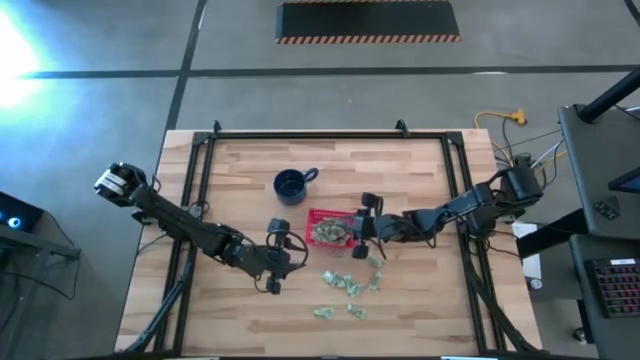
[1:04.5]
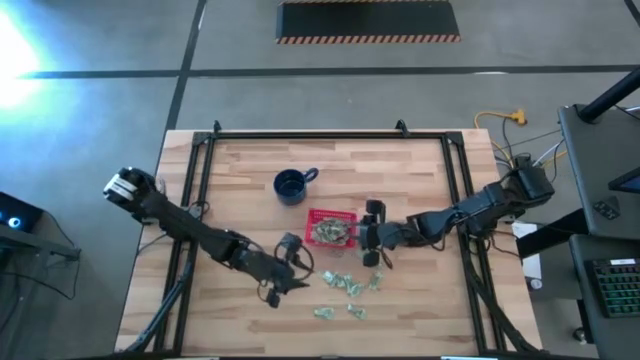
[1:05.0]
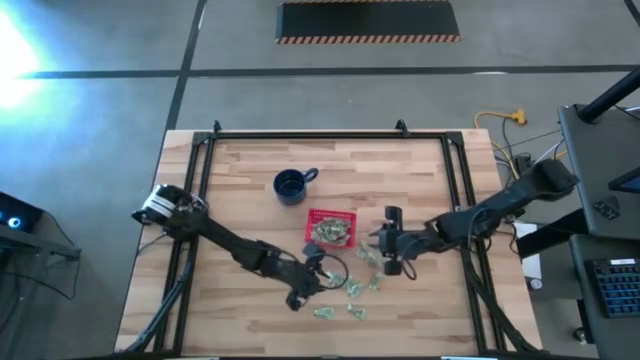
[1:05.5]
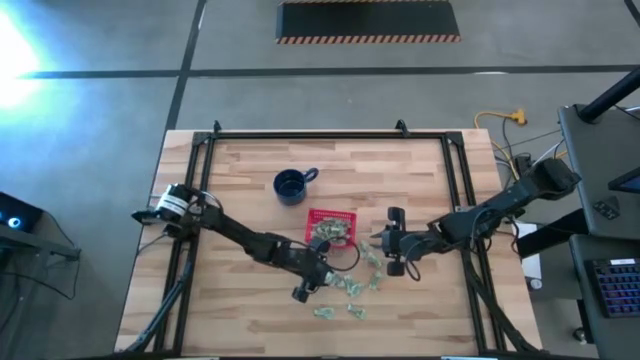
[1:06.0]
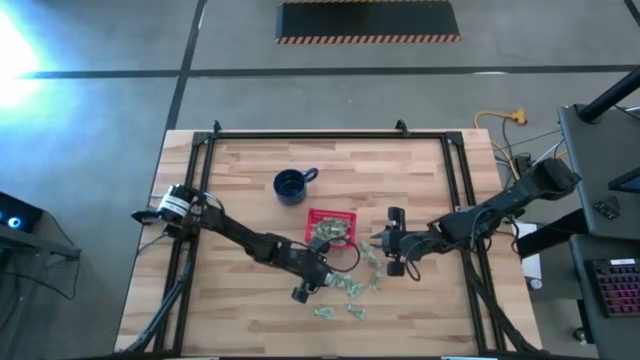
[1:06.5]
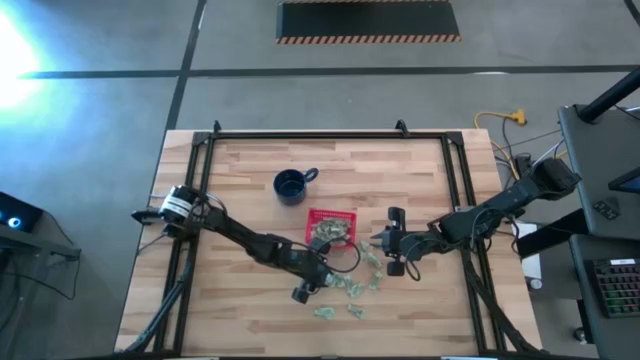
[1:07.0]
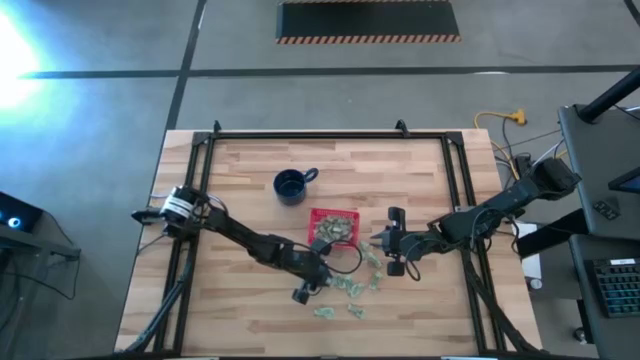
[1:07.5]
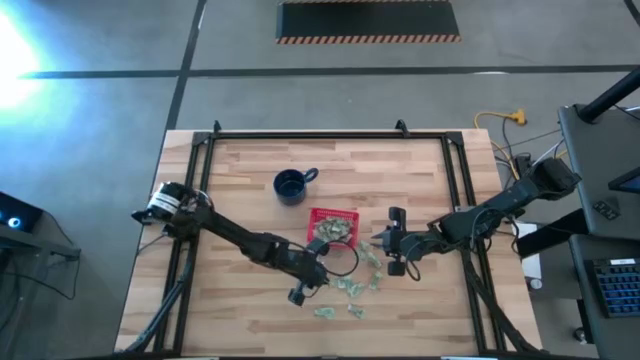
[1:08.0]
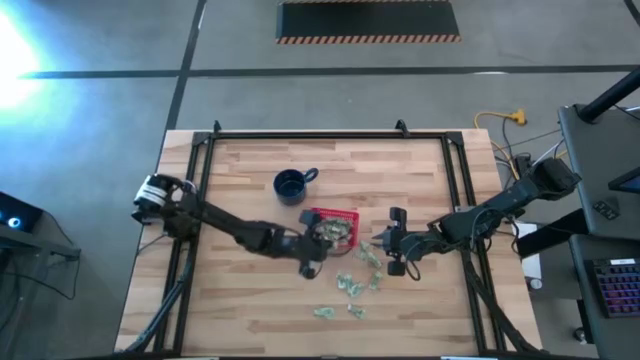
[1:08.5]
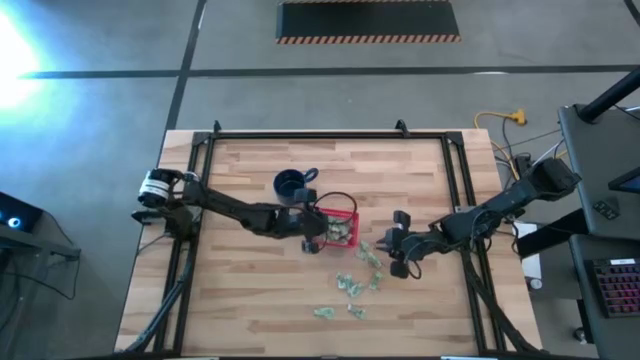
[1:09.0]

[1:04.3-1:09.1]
Task: Pick and place Stevia / Truvia into bins
Put the white stevia packet into the red basket

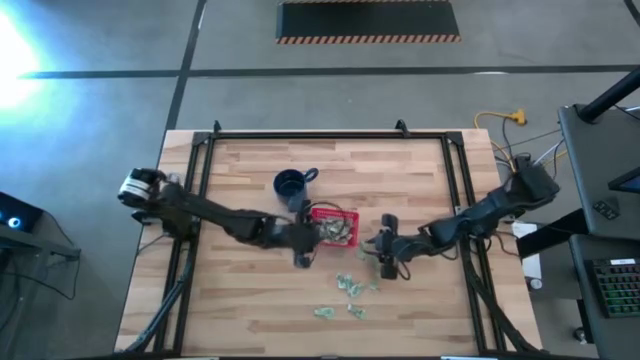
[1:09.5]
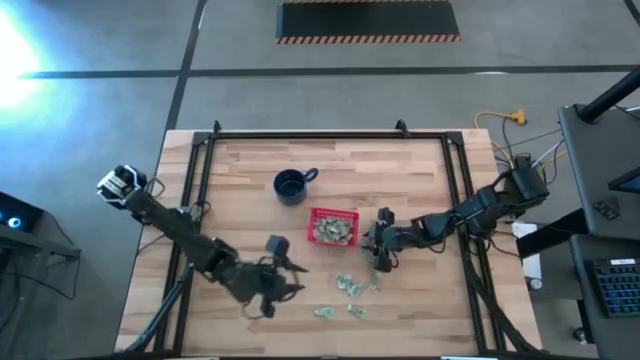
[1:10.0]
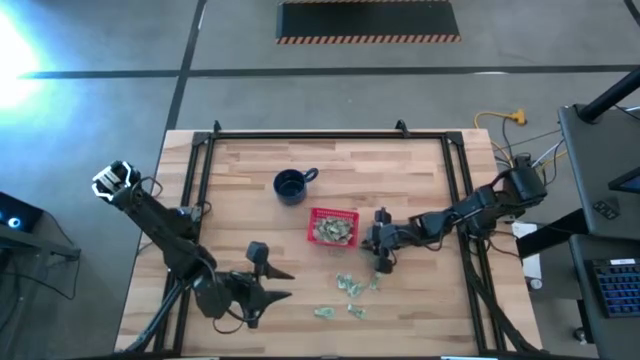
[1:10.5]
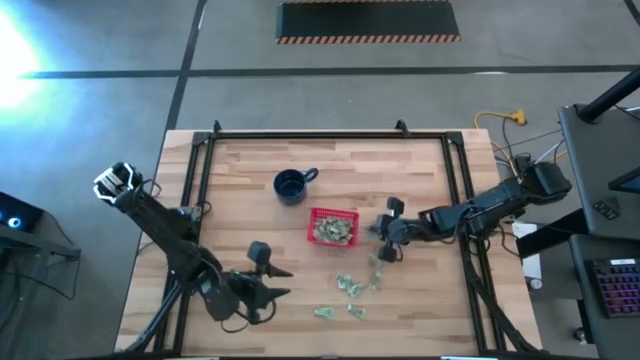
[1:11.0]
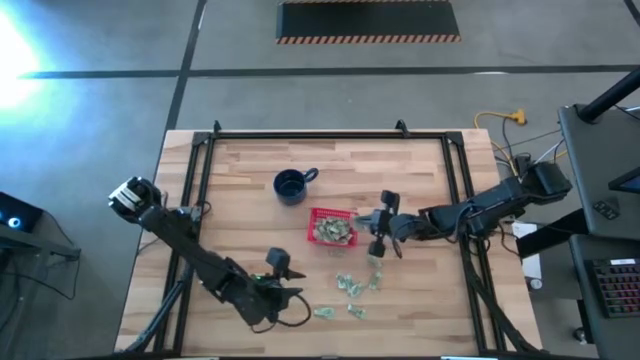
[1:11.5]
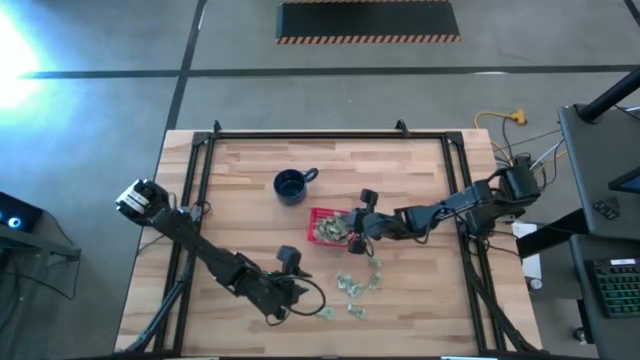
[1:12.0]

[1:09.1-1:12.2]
Put the white stevia packet into the red basket

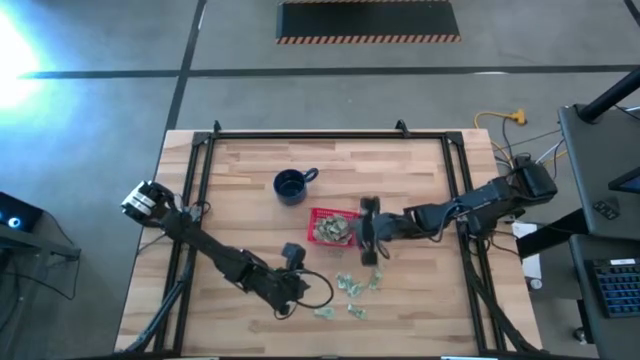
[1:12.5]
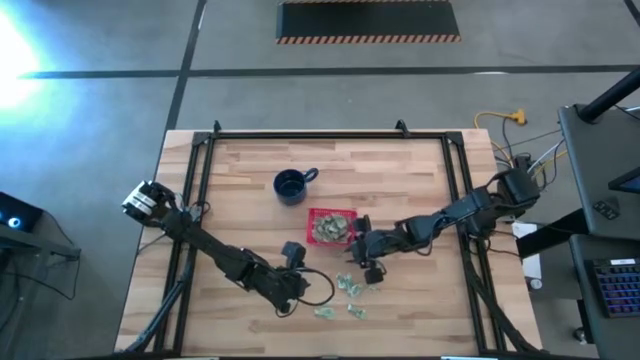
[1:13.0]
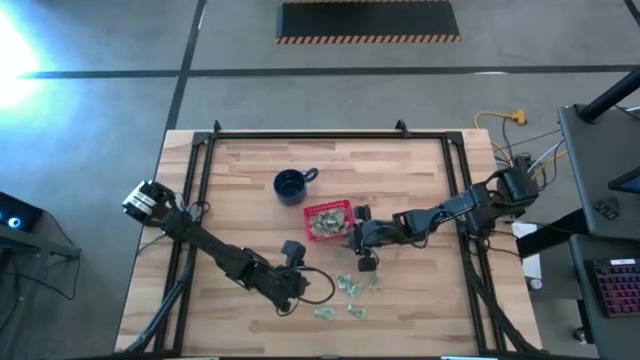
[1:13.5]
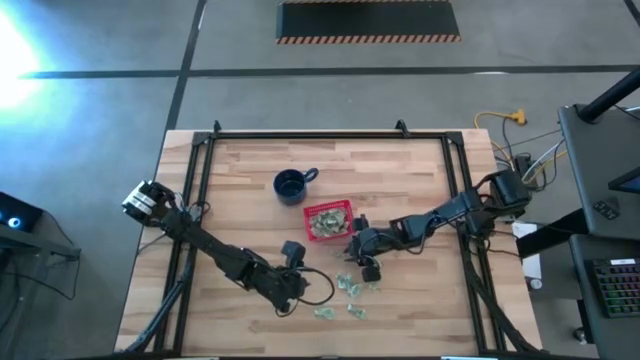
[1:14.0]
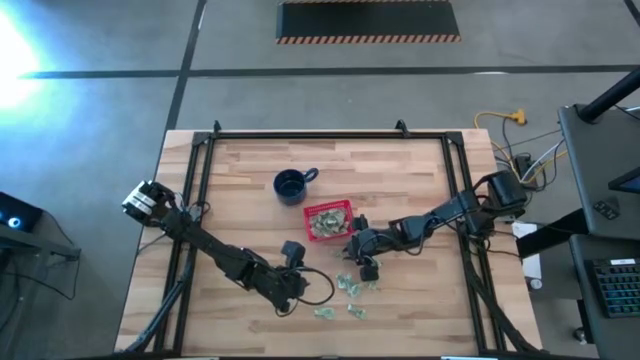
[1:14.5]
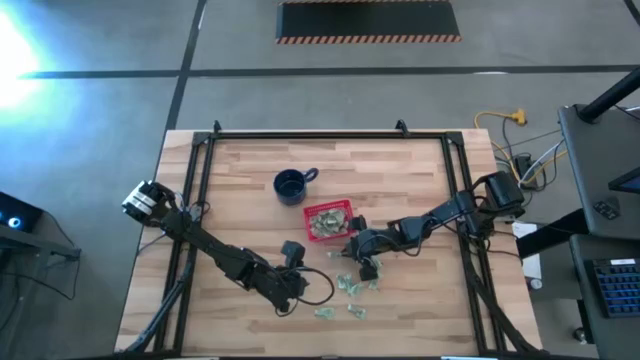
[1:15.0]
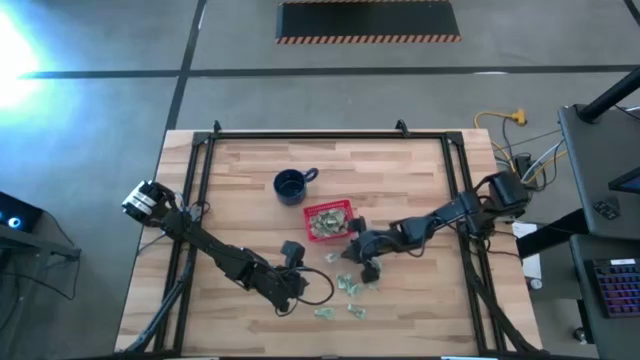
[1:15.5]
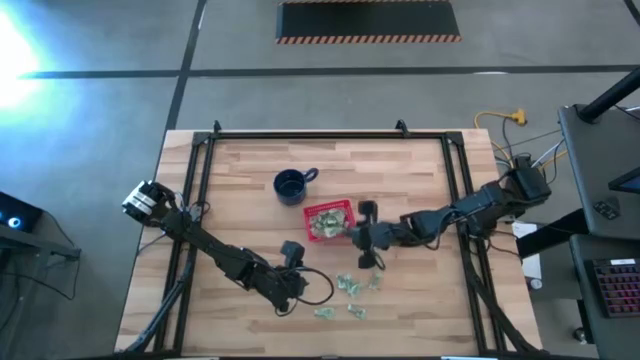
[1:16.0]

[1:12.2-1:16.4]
Put the white stevia packet into the red basket

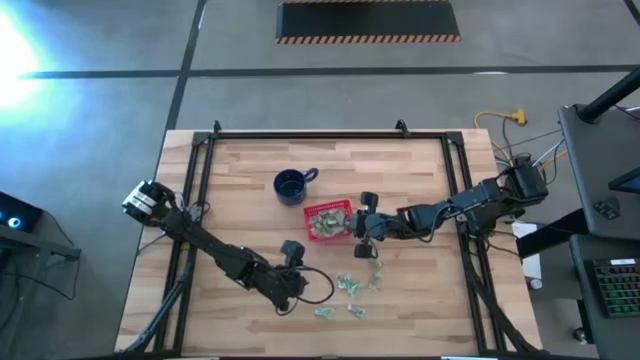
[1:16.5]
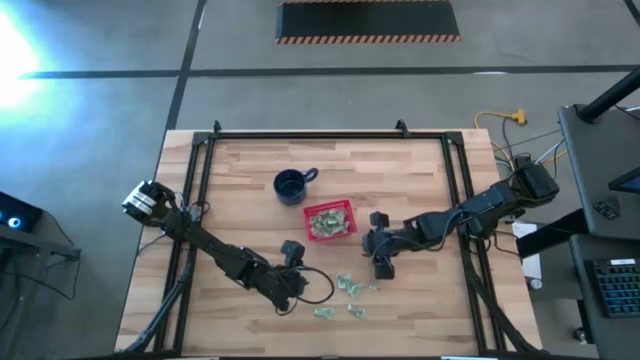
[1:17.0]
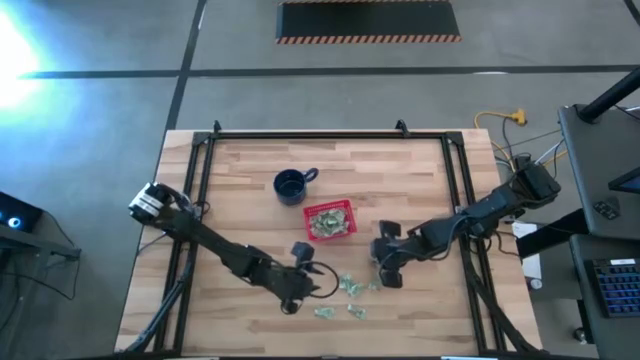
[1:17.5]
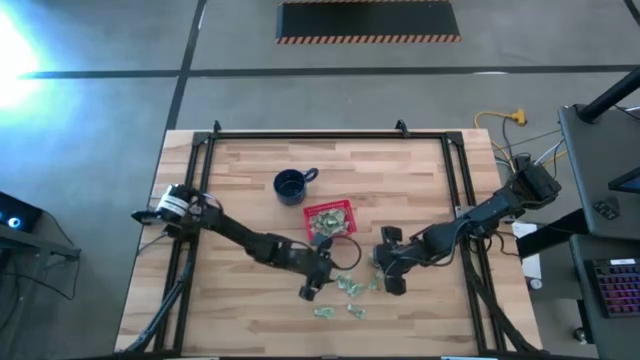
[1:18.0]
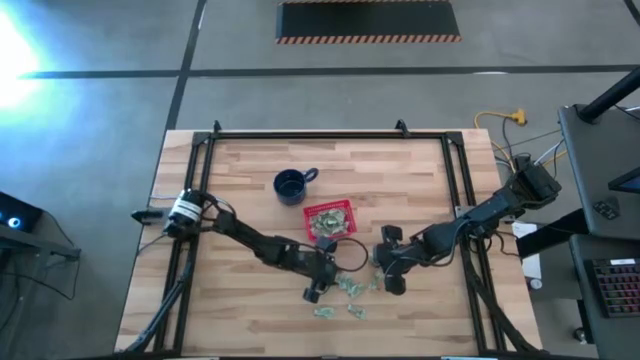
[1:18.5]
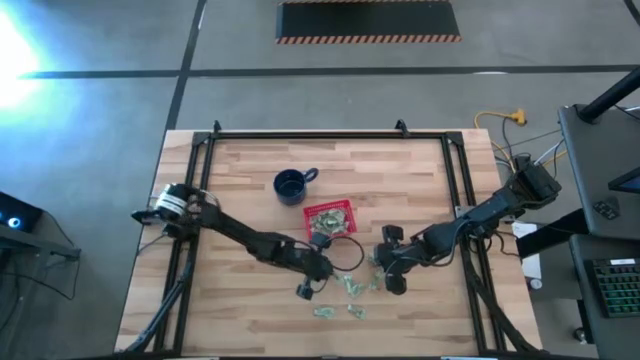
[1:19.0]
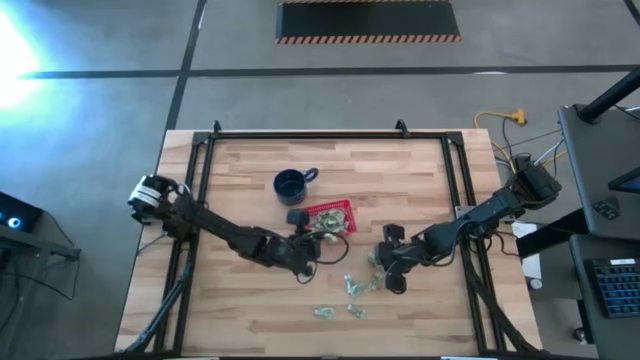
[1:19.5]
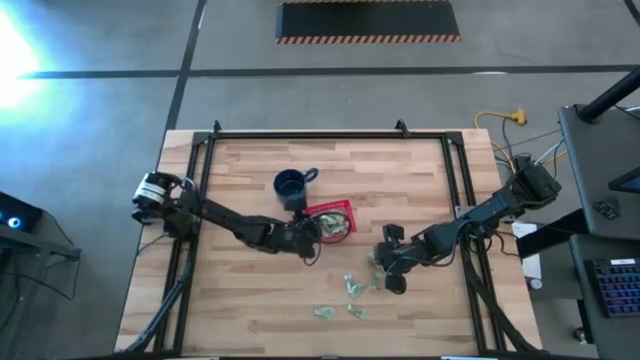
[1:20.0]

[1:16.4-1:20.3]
Put the white stevia packet into the red basket

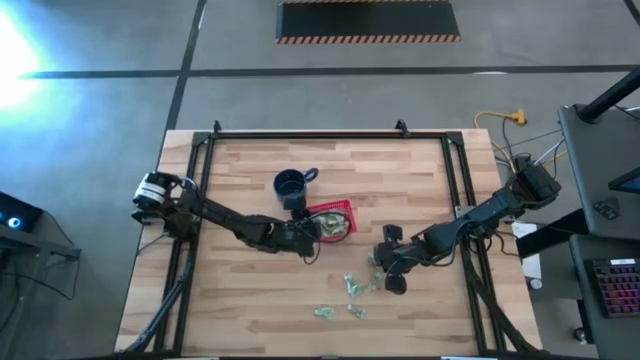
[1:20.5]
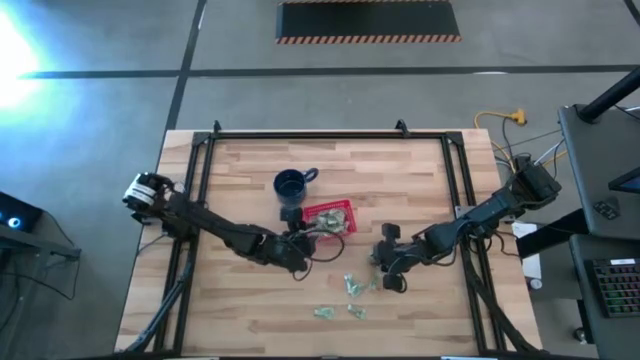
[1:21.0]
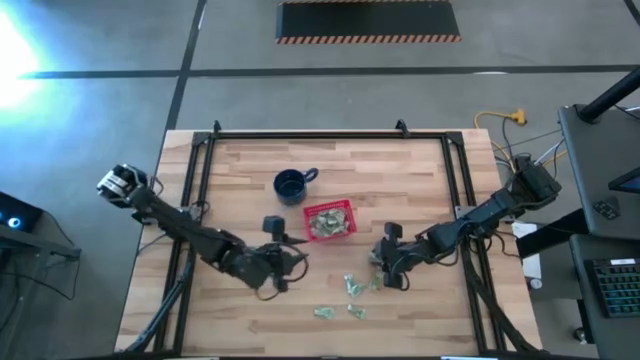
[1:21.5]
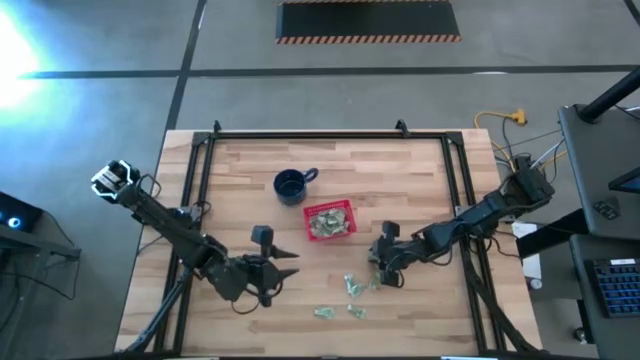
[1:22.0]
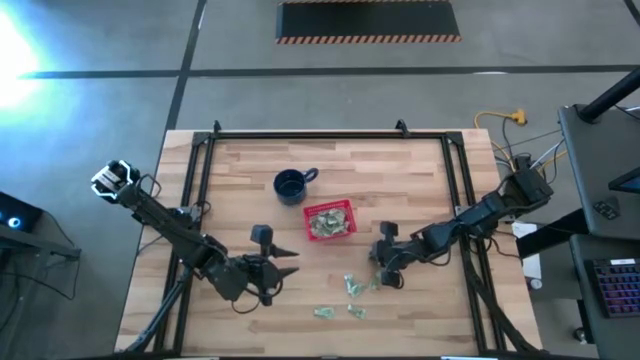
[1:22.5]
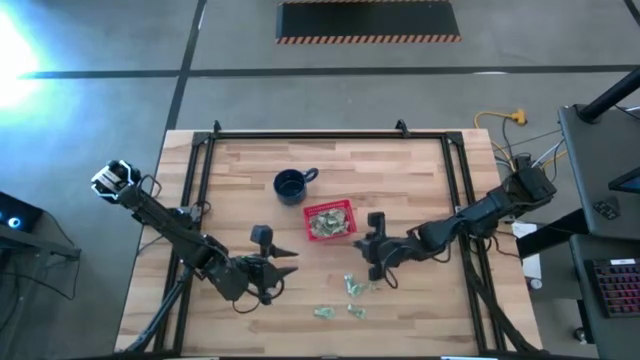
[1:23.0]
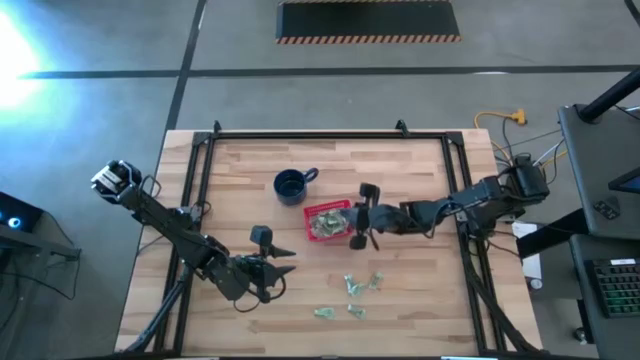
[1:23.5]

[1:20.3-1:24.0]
Put the white stevia packet into the red basket

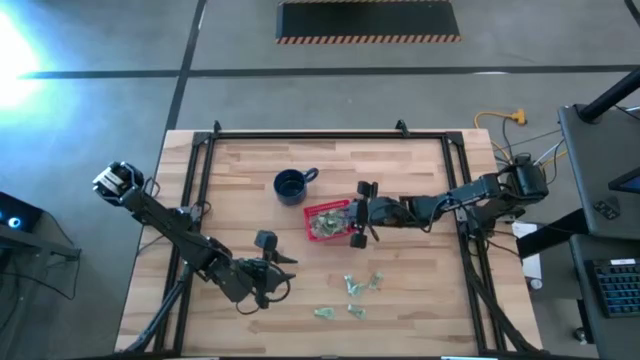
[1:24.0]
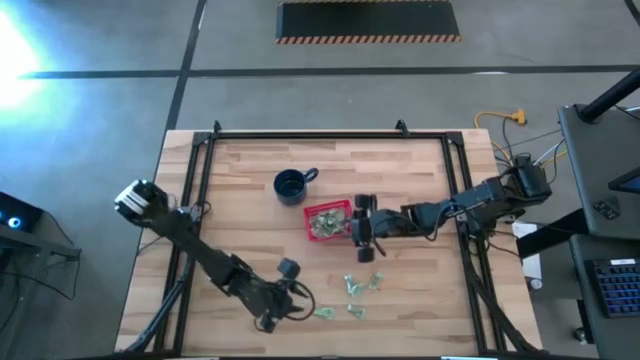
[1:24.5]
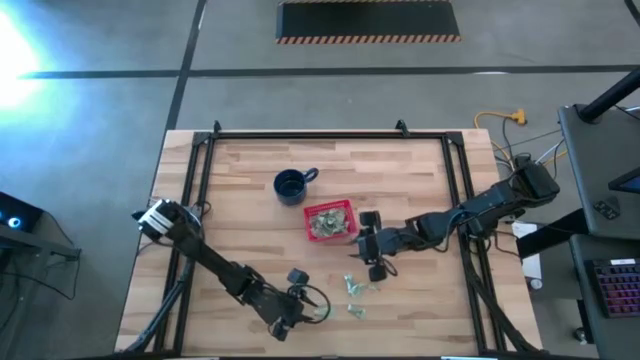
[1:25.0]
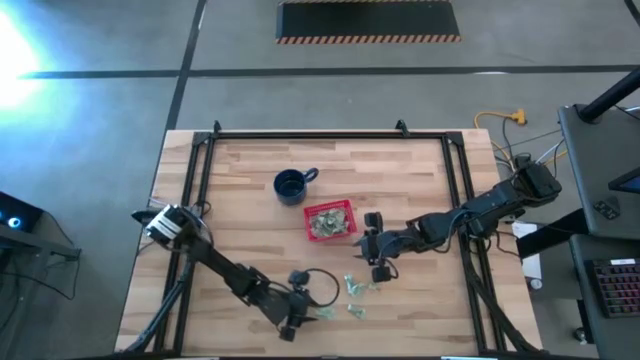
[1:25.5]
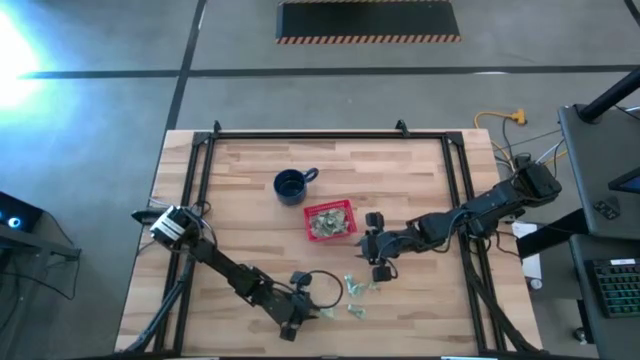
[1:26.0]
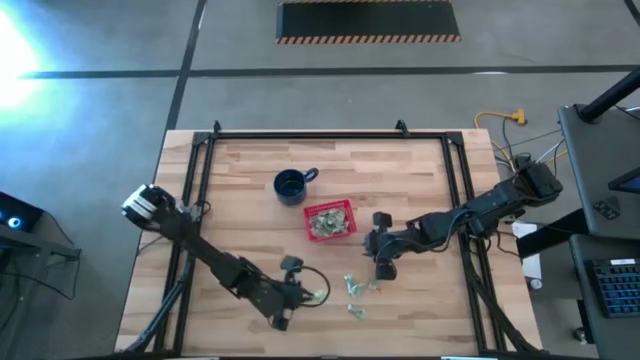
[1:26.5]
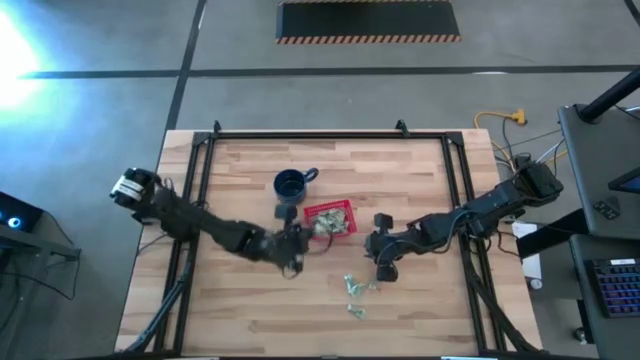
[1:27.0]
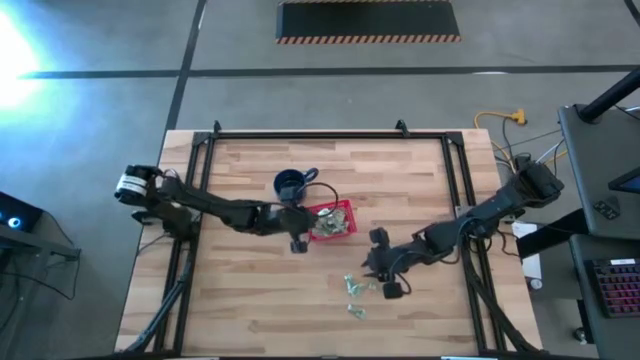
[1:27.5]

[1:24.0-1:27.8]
Put the white stevia packet into the red basket
